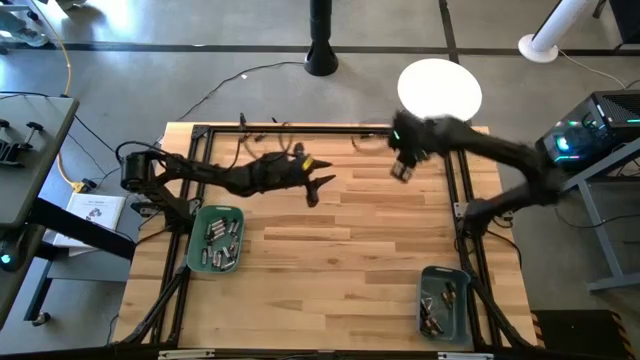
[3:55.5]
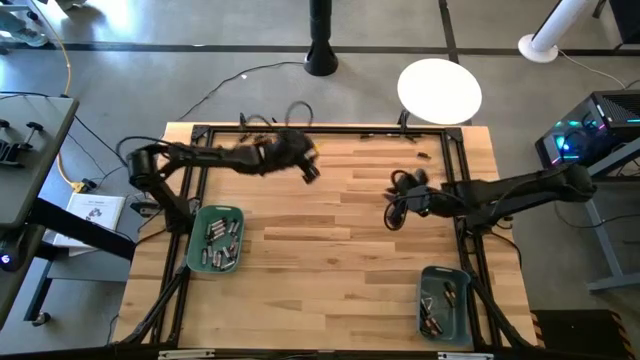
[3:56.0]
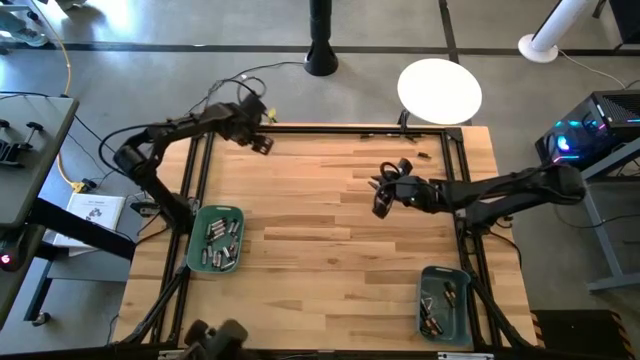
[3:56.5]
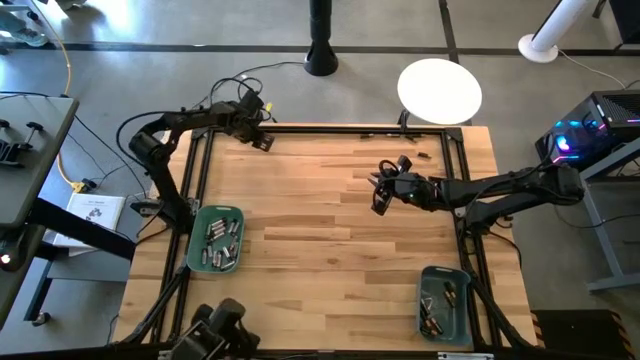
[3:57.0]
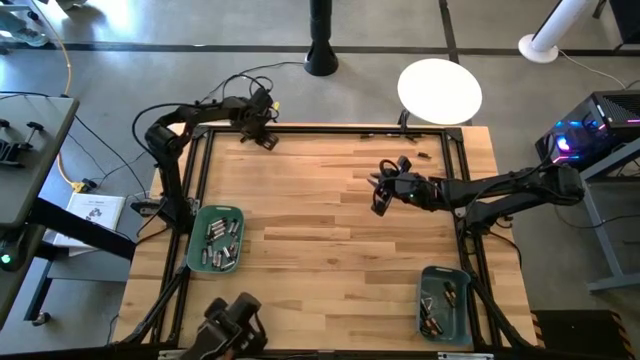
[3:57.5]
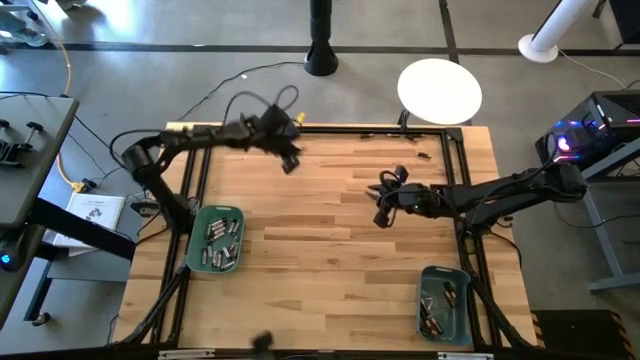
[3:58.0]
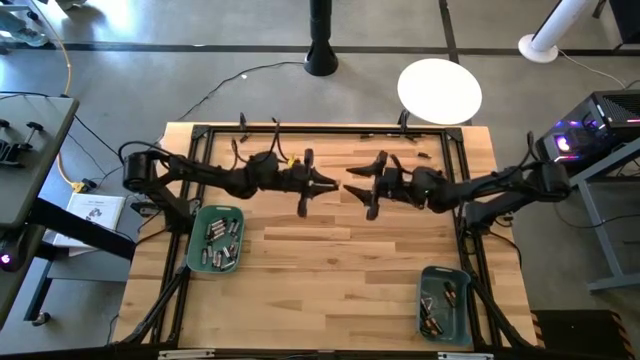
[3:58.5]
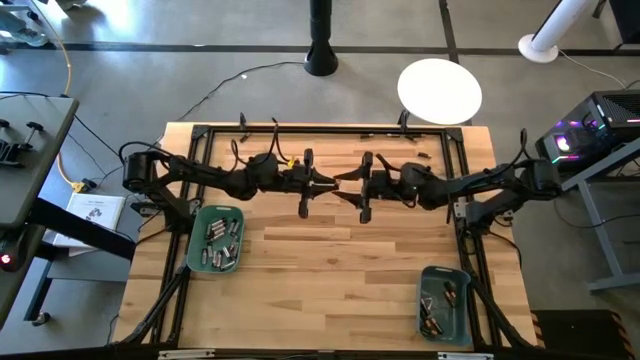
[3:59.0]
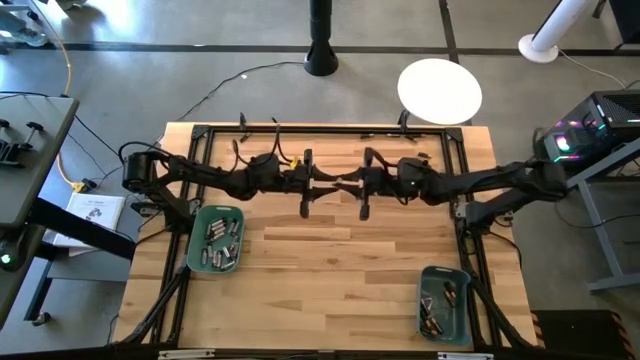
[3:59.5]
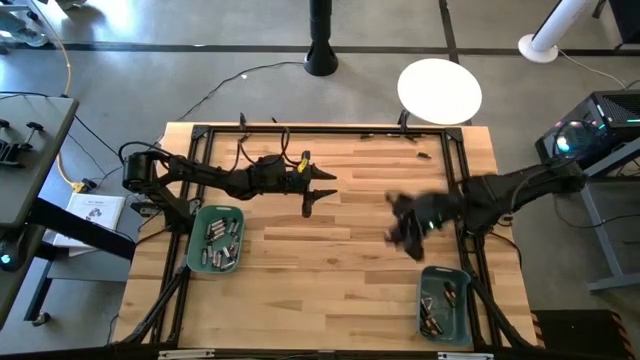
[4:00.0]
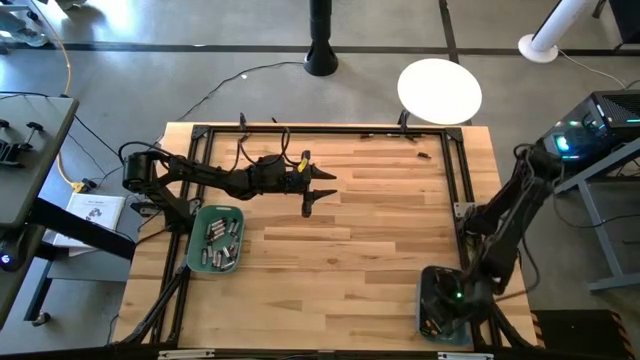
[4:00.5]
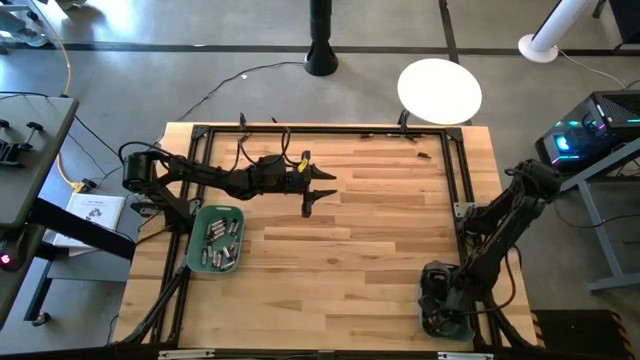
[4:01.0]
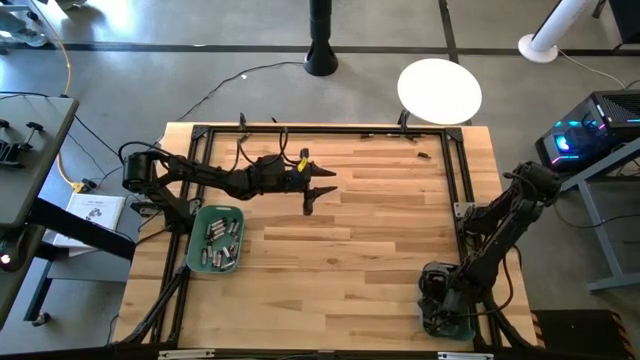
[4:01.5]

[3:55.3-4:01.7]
Task: Sort batteries
Put the black battery into the blue bin

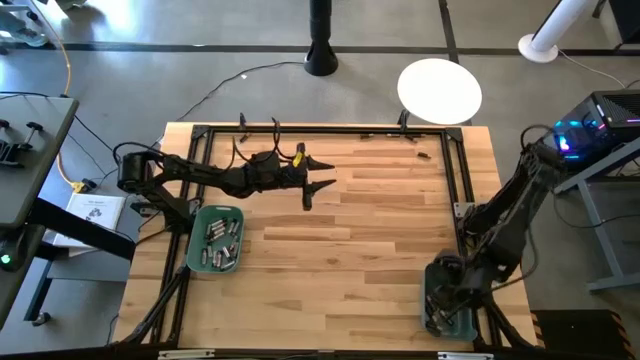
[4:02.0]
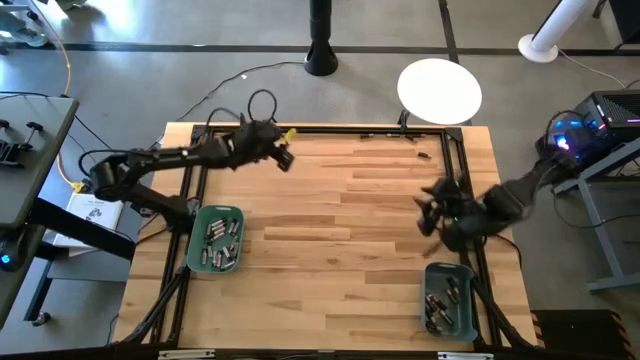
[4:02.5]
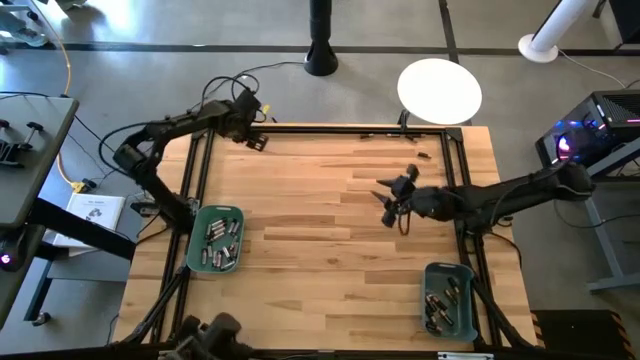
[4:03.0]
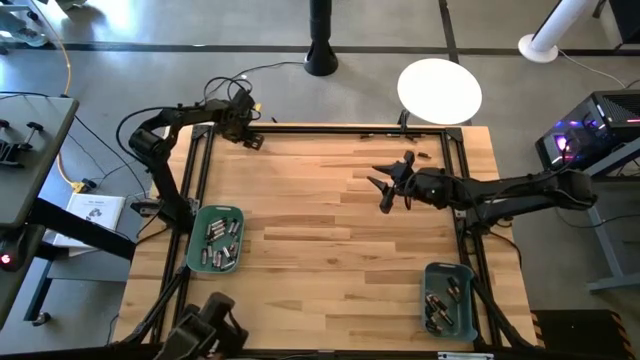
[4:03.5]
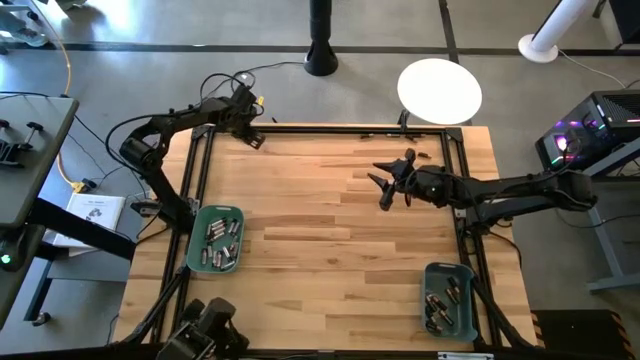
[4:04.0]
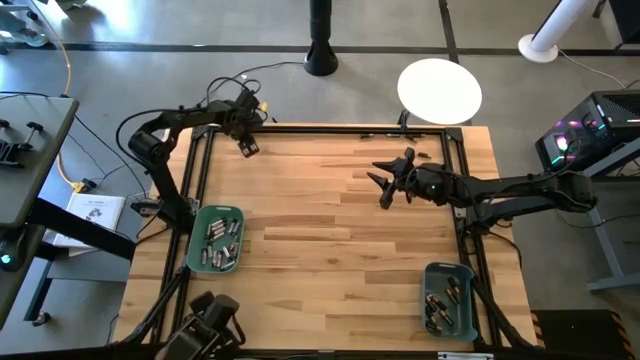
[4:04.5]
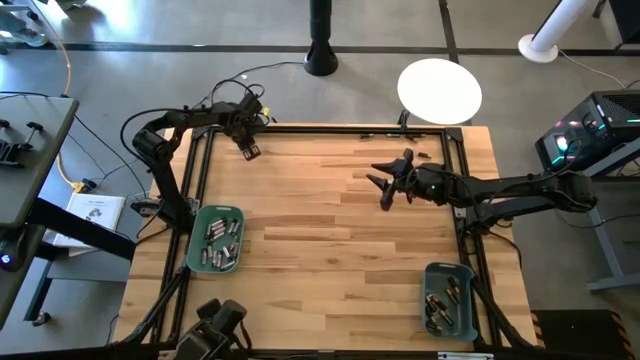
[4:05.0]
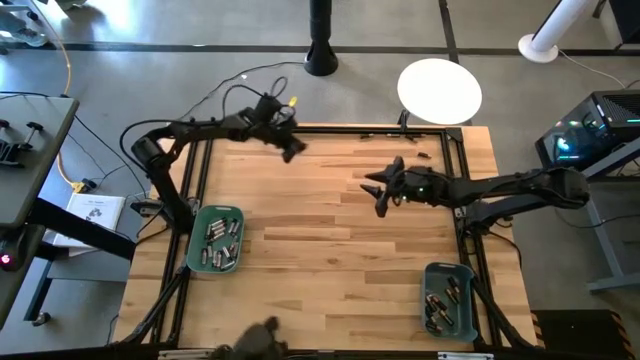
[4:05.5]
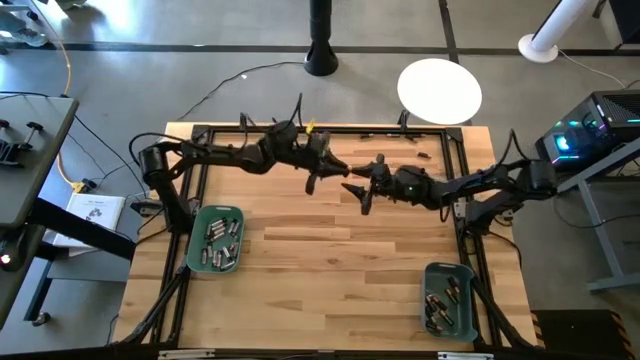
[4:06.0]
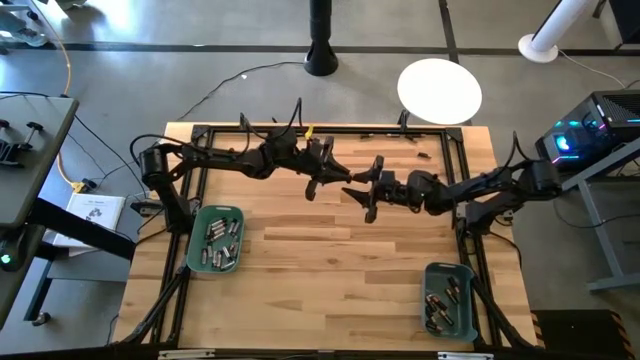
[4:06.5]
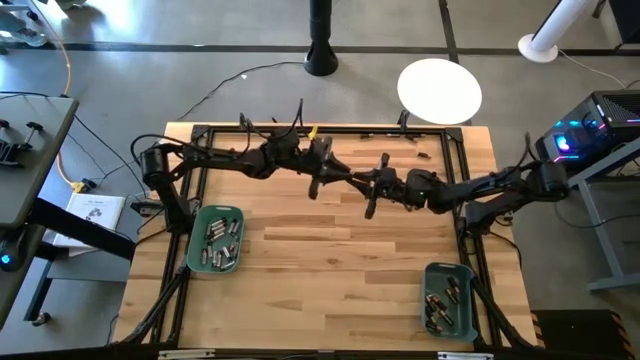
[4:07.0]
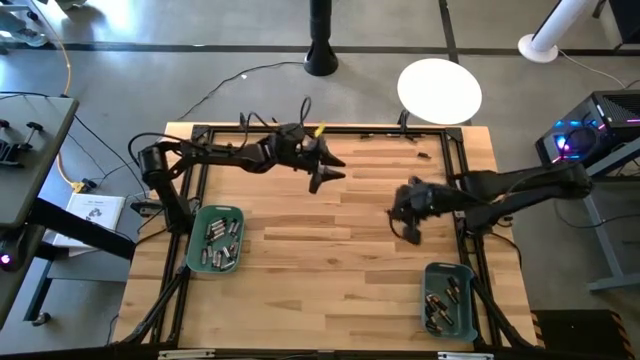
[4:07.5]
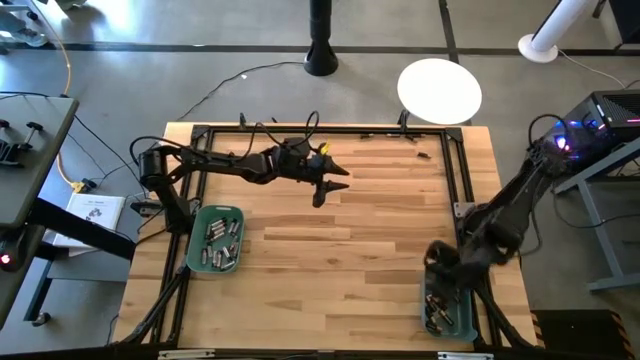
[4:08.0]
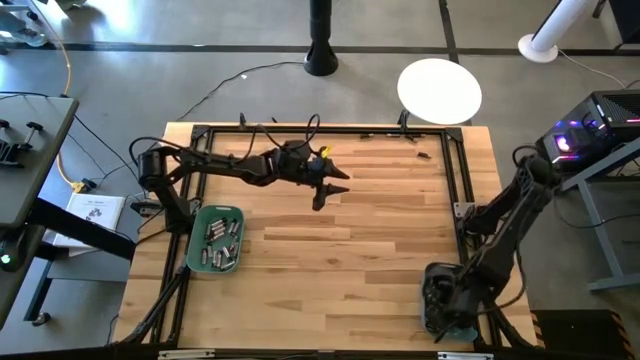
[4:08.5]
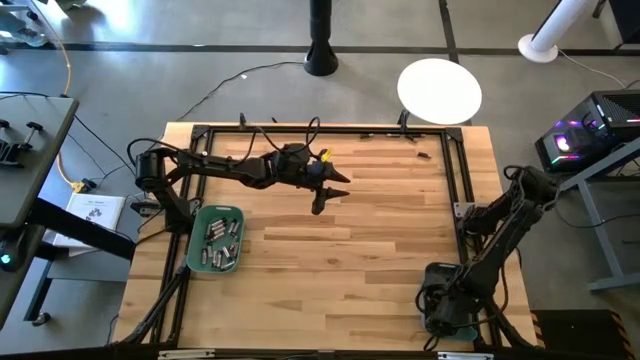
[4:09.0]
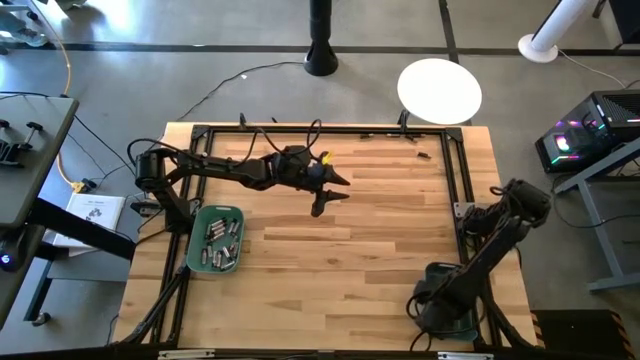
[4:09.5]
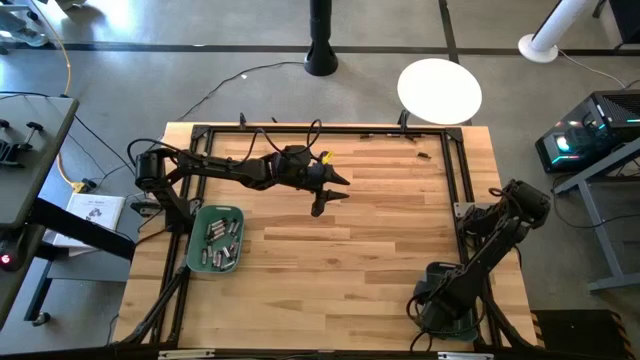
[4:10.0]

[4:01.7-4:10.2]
Put the black battery into the blue bin

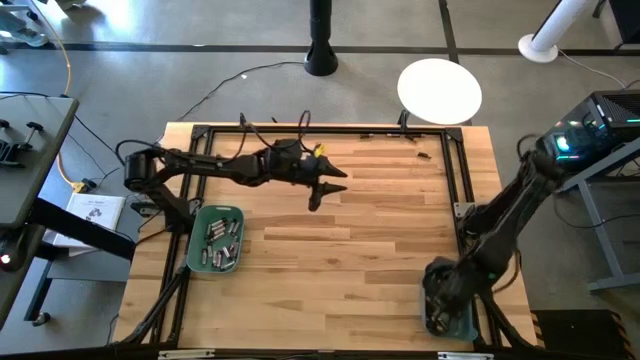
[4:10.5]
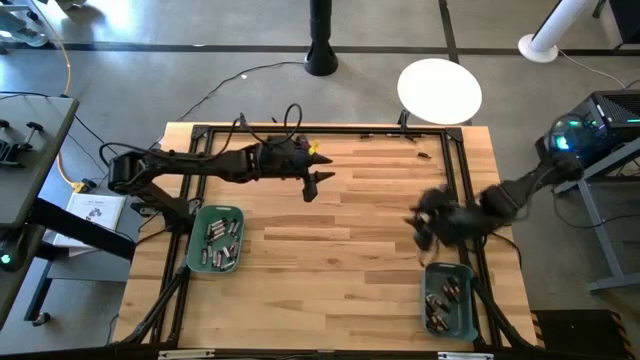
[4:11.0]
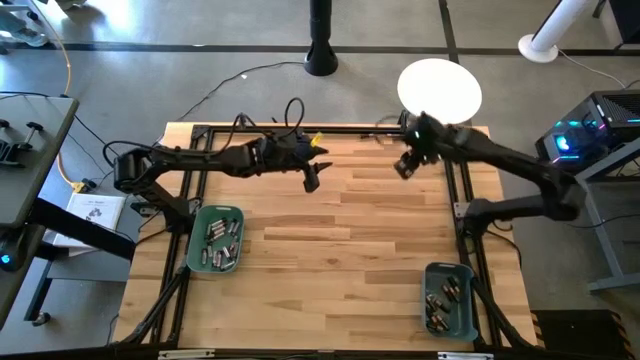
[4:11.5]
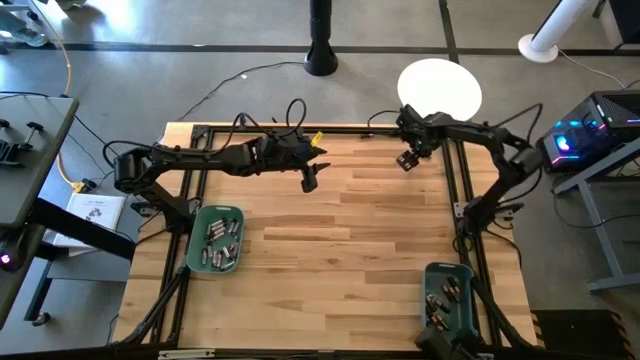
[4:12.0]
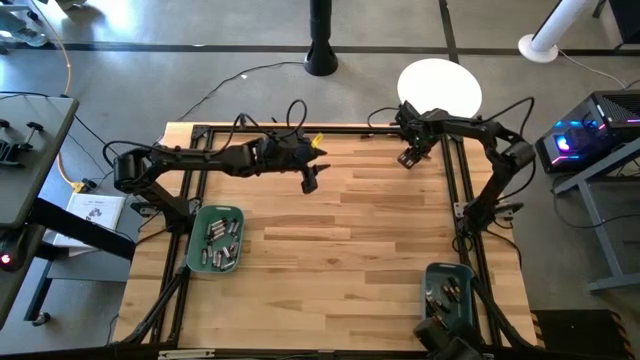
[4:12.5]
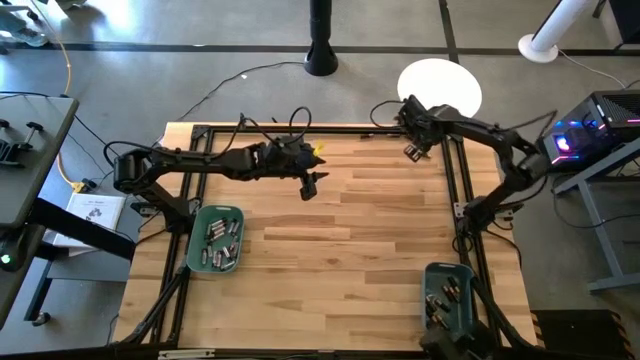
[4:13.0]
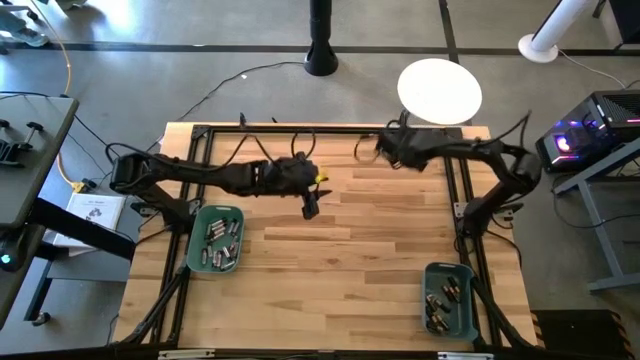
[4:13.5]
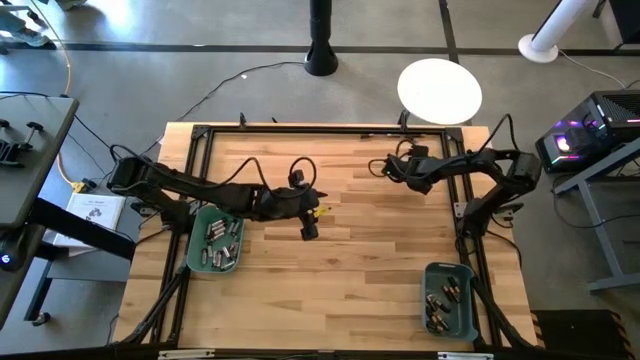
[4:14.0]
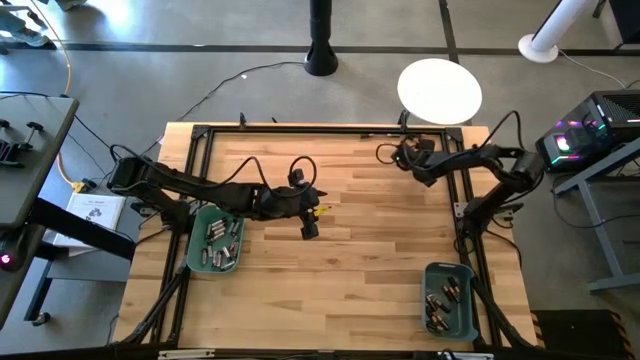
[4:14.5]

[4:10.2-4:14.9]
Put the black battery into the blue bin
